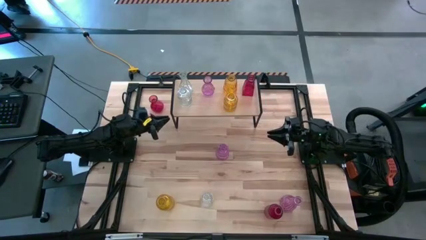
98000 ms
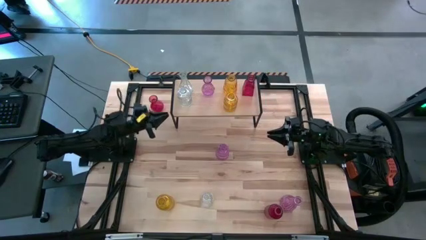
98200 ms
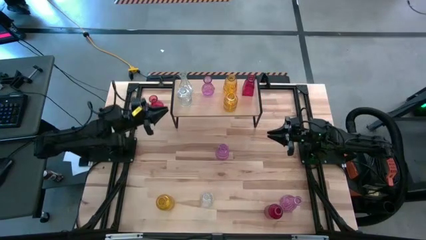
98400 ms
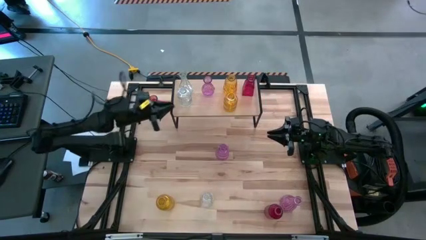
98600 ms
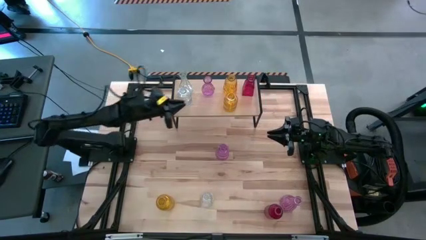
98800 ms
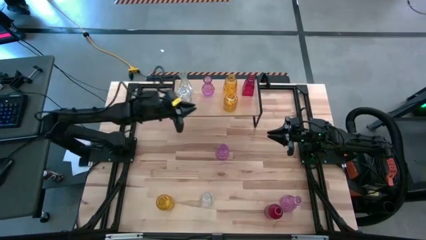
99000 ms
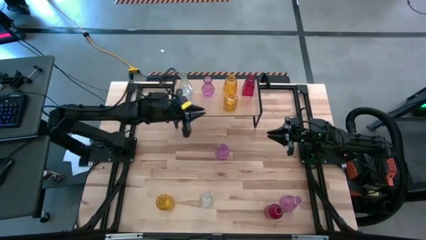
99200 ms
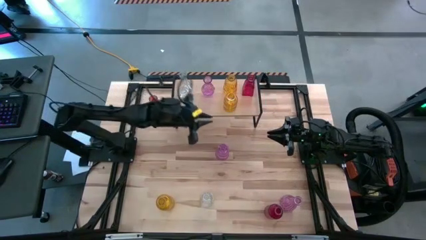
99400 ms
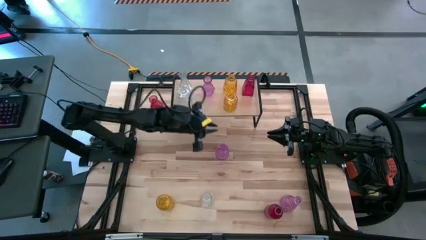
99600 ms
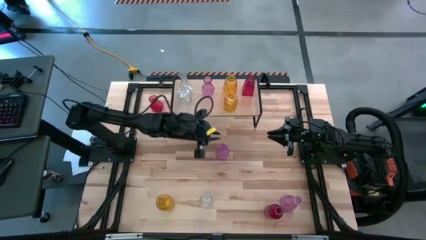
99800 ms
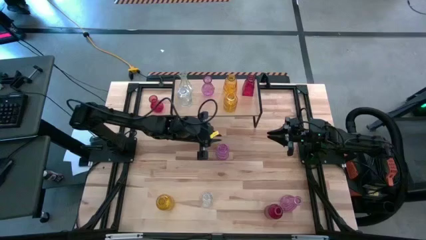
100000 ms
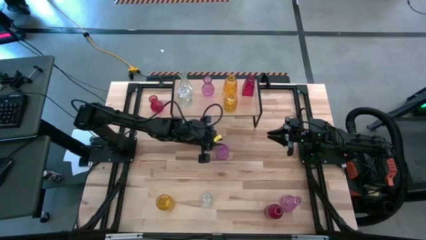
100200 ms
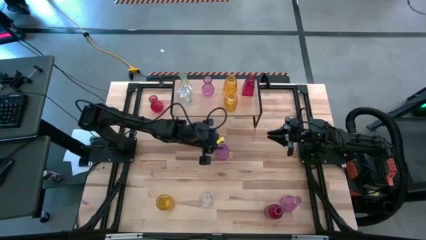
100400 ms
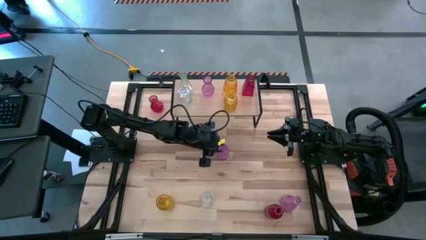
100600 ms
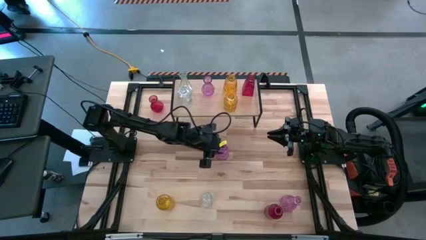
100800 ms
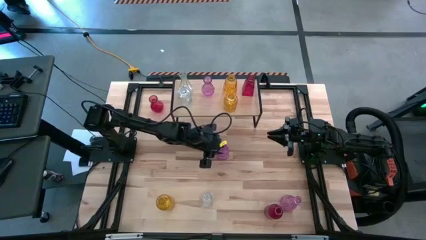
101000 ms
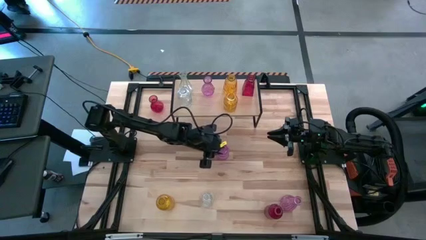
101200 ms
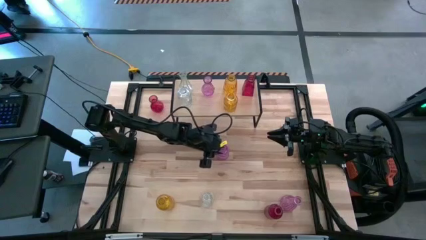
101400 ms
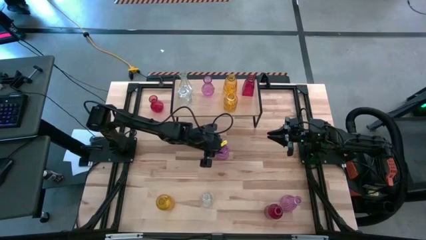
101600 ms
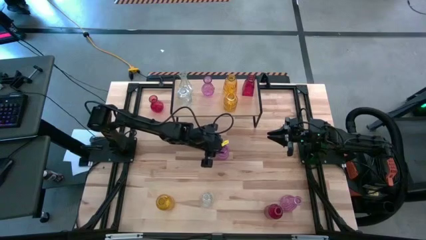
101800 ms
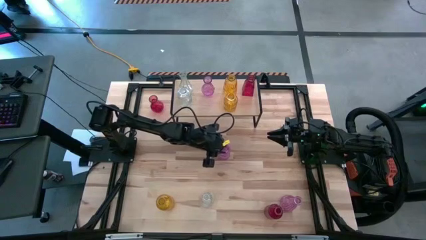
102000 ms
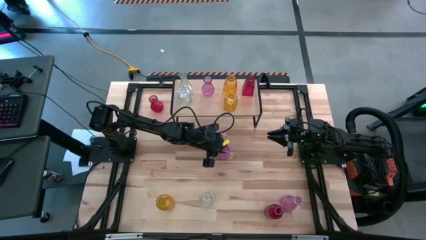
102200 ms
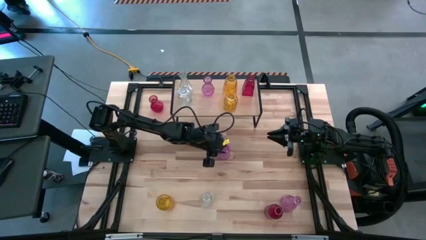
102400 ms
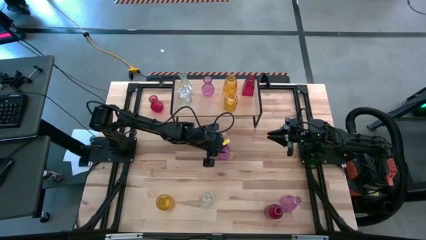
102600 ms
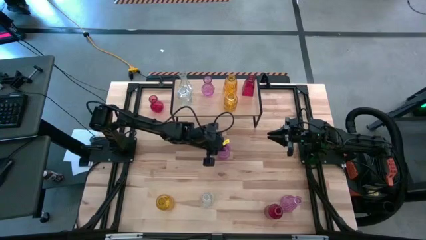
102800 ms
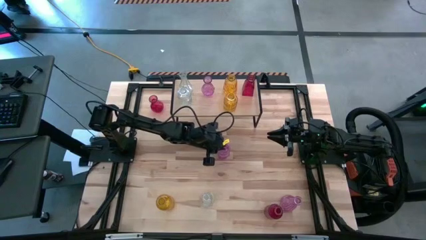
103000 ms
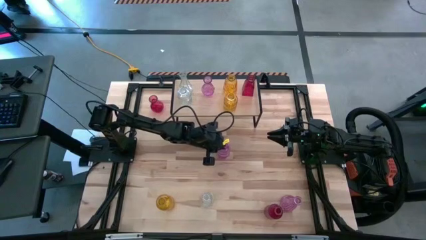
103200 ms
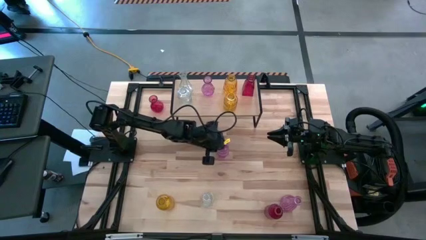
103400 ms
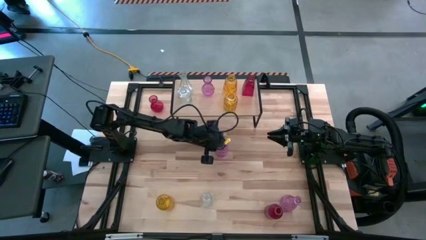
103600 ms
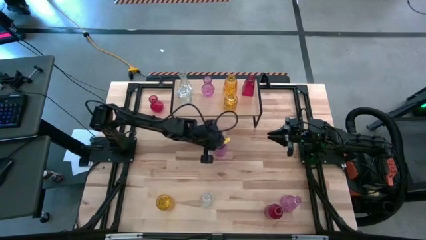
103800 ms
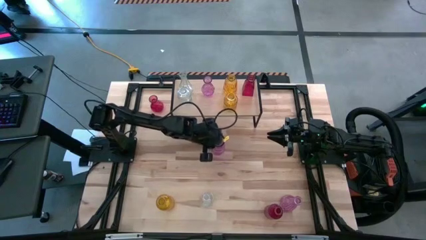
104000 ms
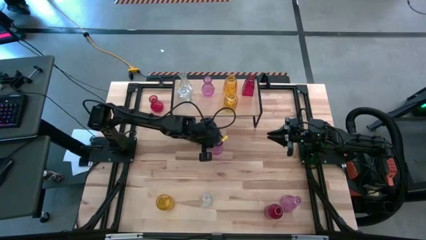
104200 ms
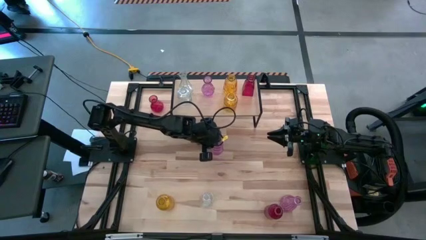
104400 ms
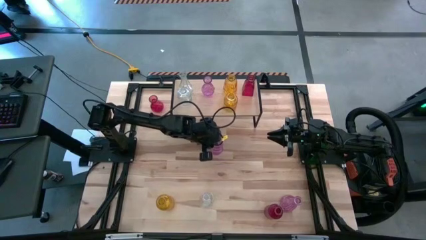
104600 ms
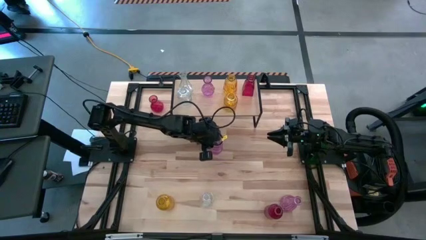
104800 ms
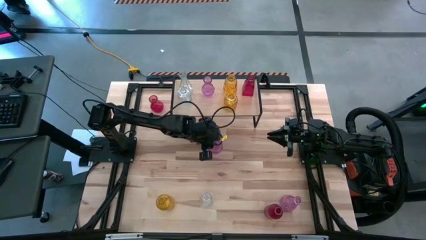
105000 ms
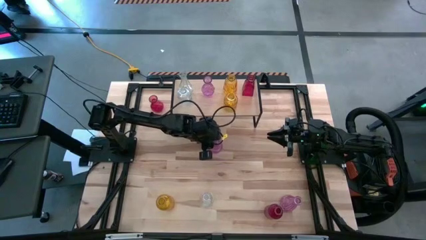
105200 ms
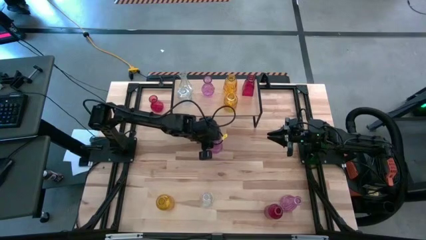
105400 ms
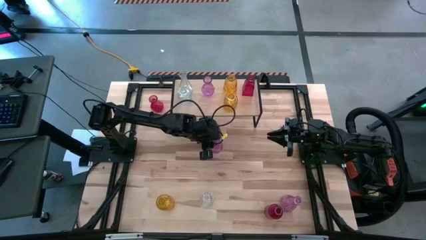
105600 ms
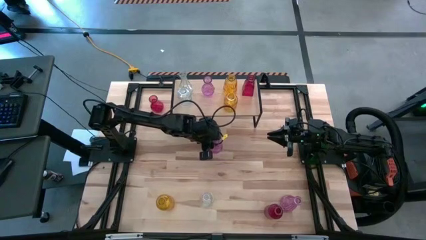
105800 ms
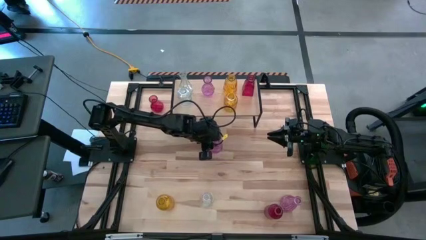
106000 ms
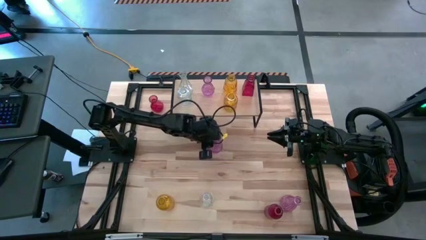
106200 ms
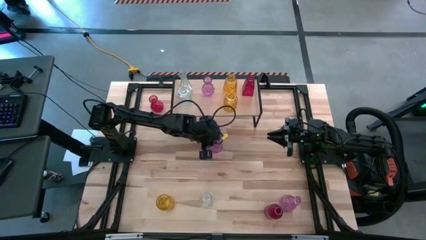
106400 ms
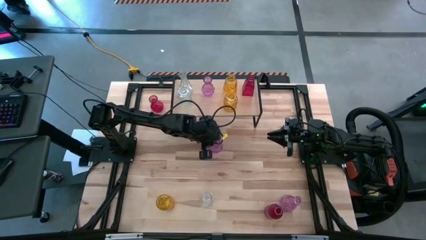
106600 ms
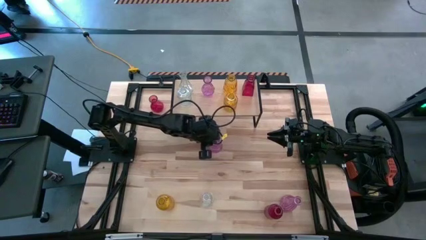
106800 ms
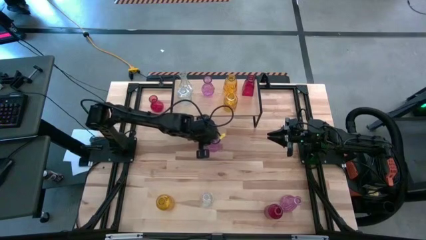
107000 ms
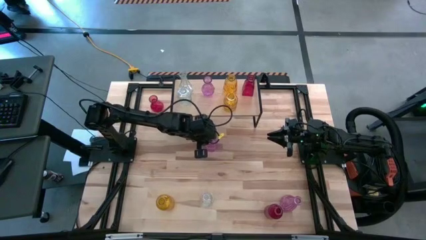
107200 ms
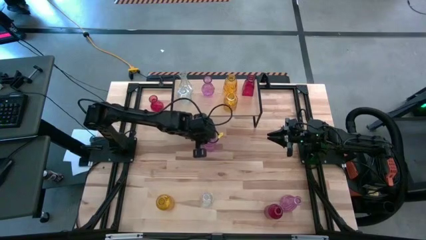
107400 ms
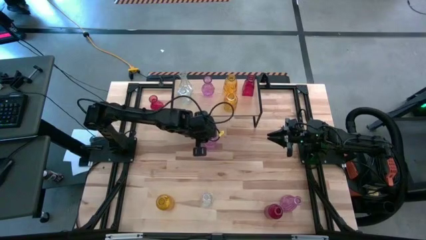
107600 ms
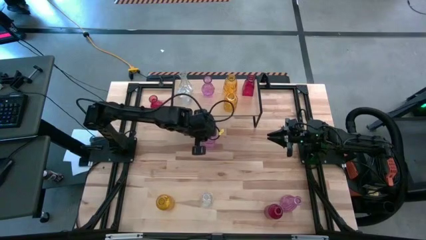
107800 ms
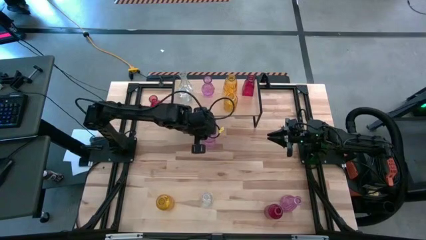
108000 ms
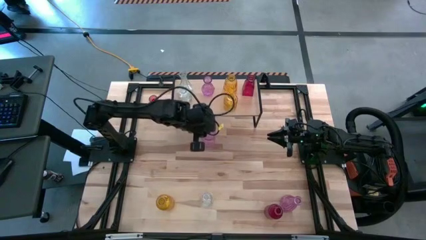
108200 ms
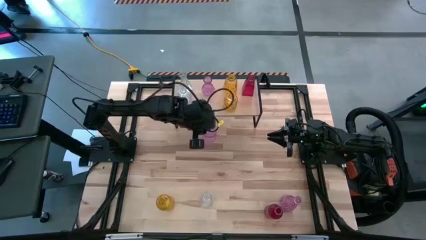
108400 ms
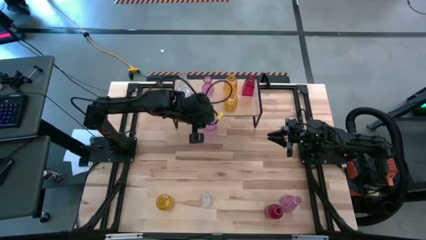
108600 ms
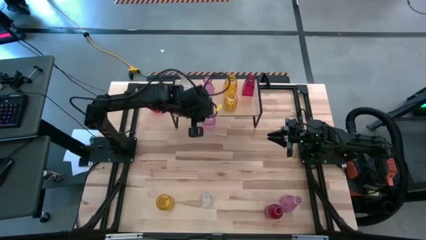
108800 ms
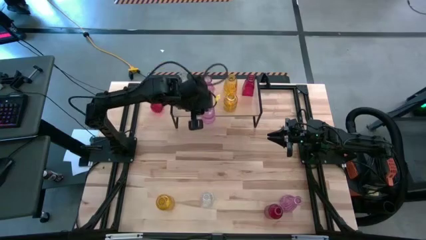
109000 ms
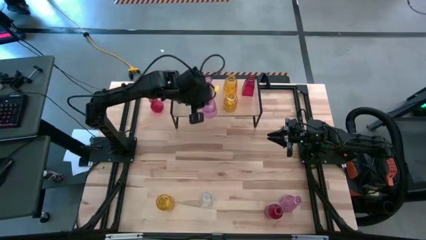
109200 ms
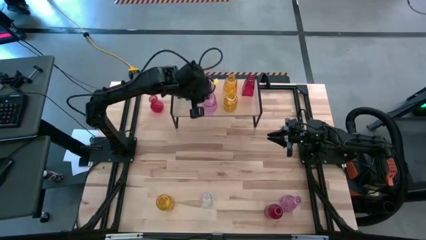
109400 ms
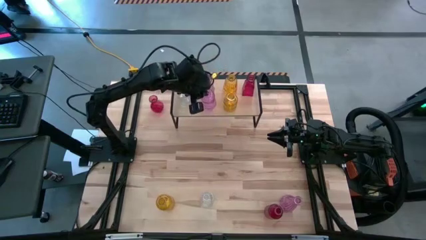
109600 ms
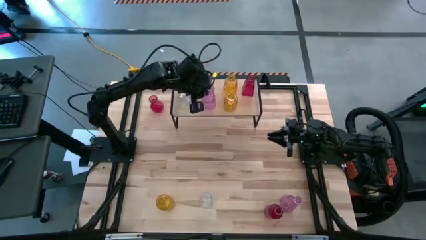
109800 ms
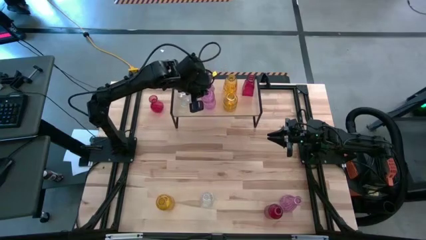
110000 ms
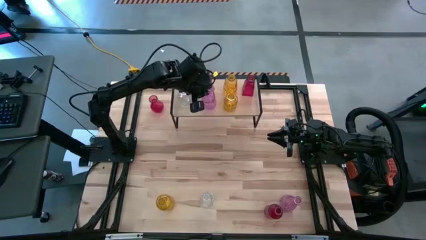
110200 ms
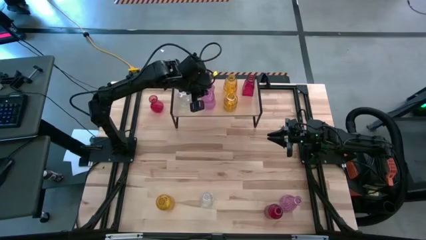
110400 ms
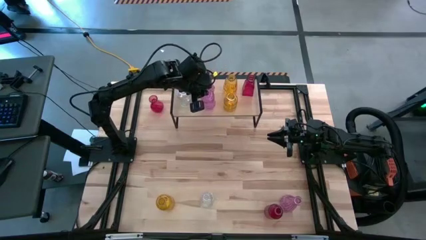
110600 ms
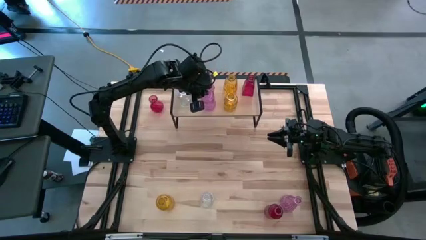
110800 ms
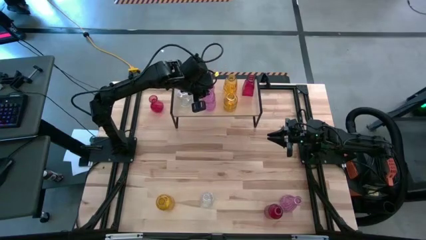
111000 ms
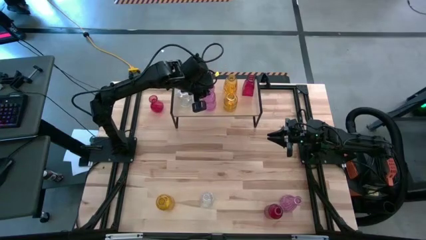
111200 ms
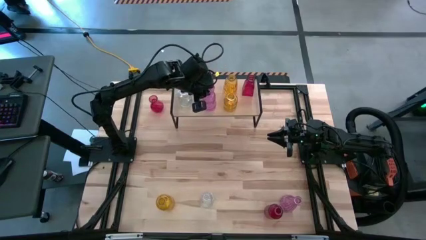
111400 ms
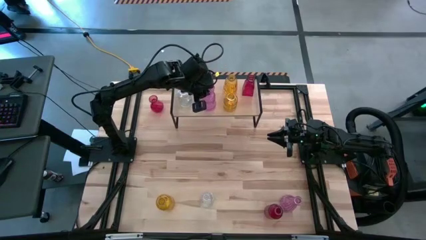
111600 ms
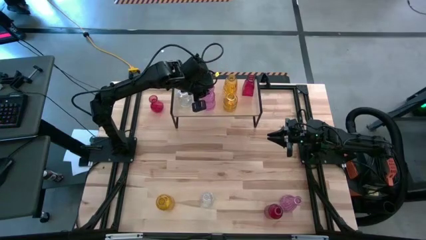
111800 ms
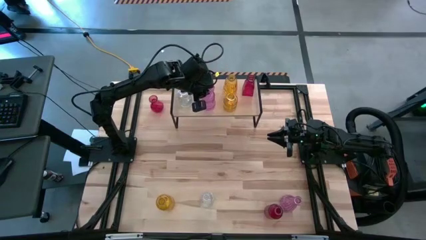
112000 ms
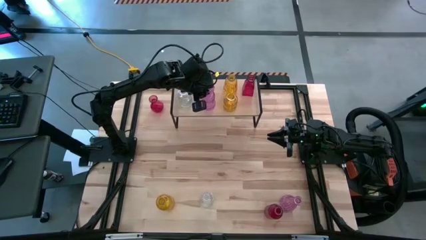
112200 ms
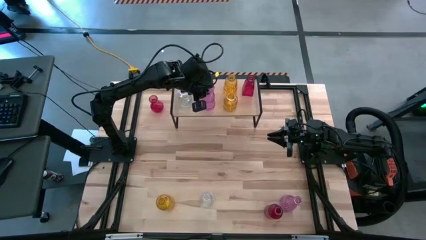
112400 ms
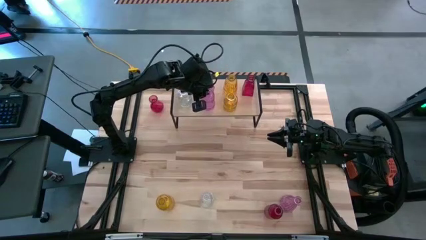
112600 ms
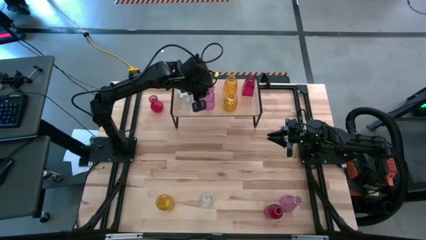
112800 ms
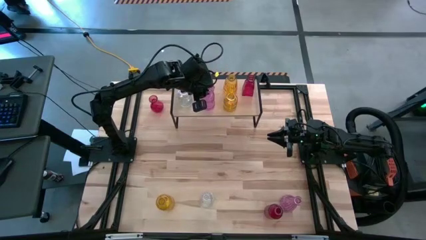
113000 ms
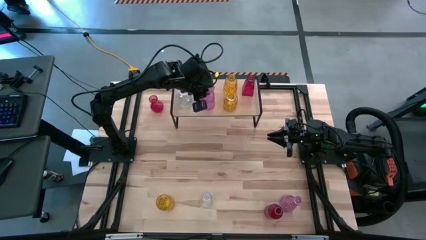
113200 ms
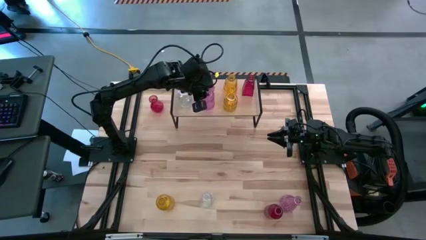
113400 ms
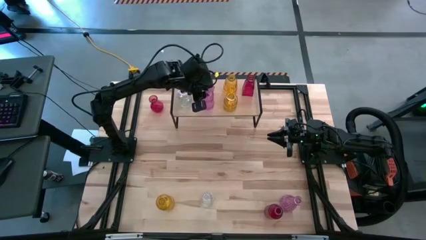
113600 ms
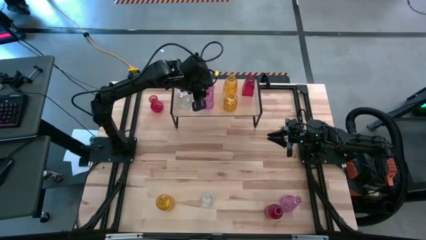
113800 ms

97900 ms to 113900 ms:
Task: sort vases onto shelf
Put the top purple vase on the shelf aligned with the other purple vase

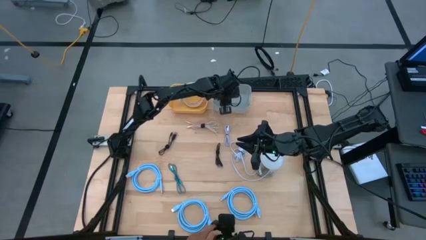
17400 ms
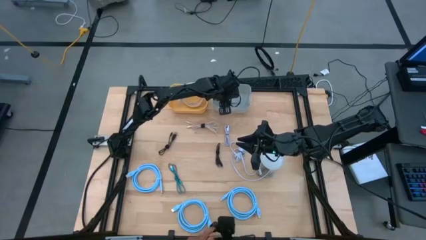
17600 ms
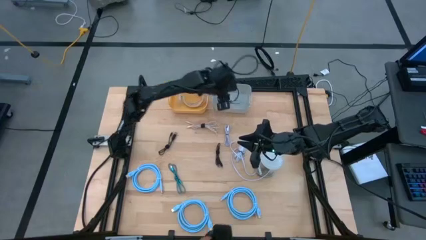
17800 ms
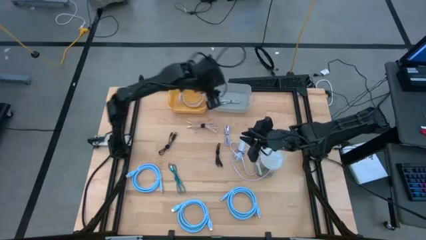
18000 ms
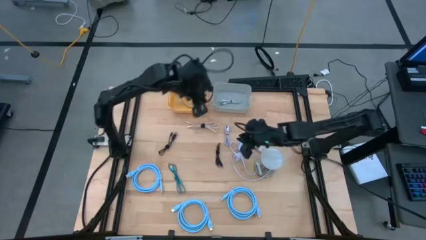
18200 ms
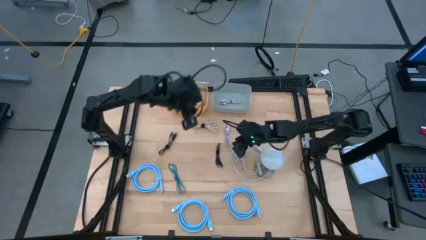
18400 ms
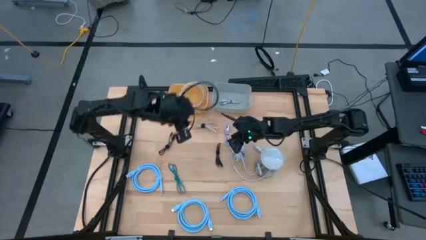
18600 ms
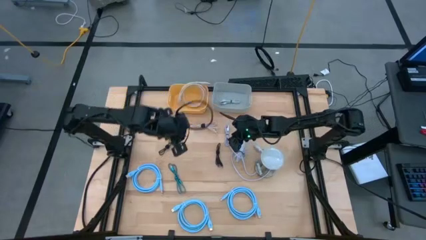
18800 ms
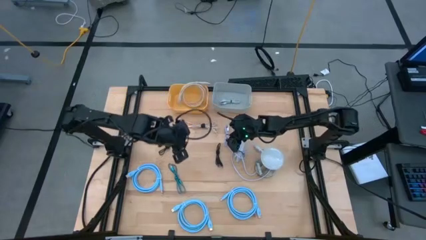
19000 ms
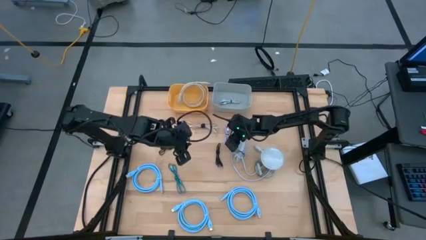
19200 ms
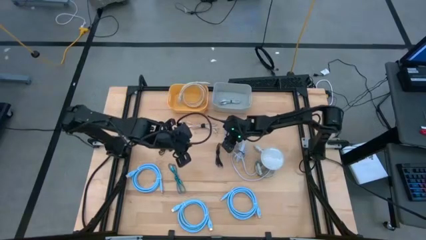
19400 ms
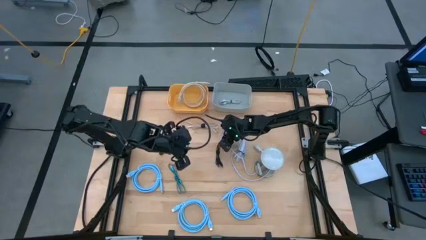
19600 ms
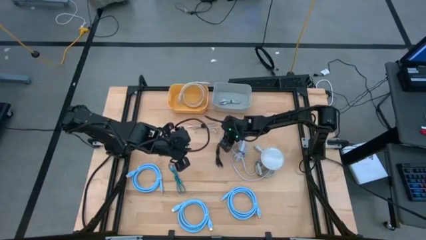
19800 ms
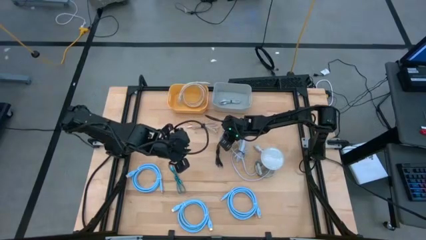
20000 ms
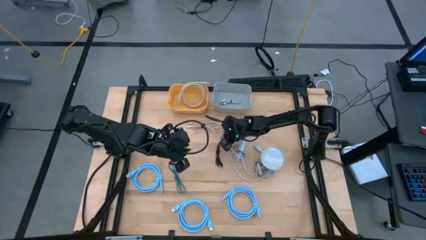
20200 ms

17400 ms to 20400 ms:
Task: Pick & Place USB Port
Put the purple charger cable into the gray bin
